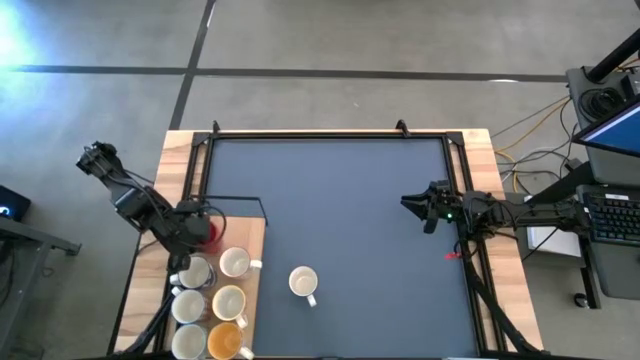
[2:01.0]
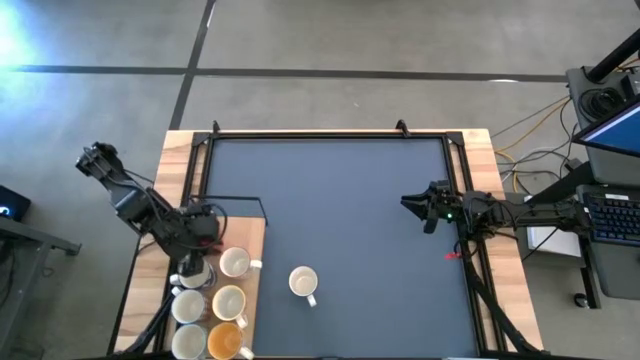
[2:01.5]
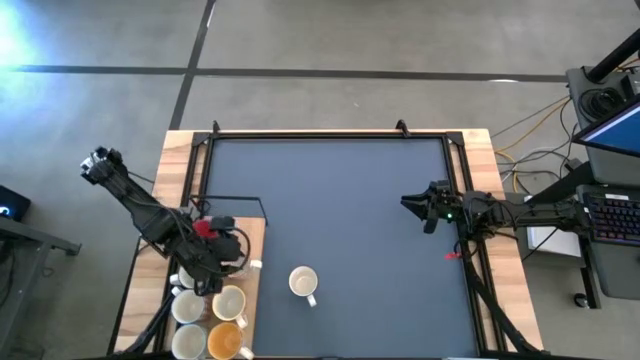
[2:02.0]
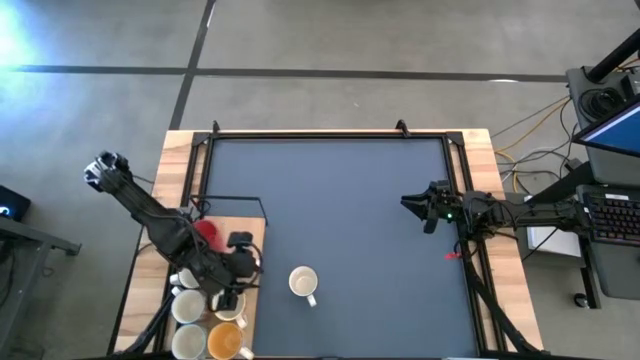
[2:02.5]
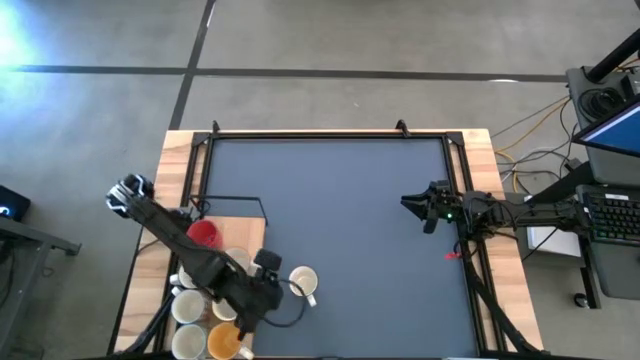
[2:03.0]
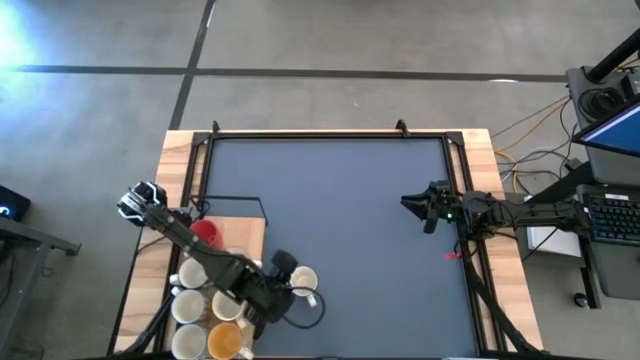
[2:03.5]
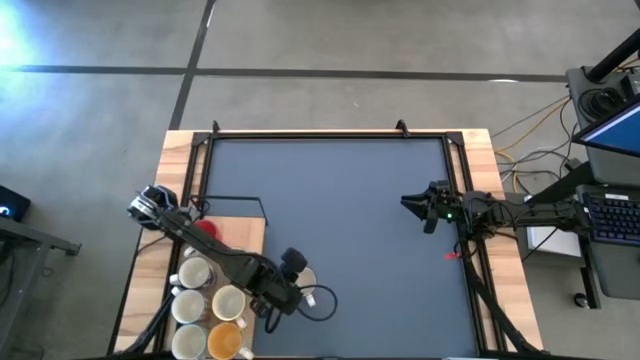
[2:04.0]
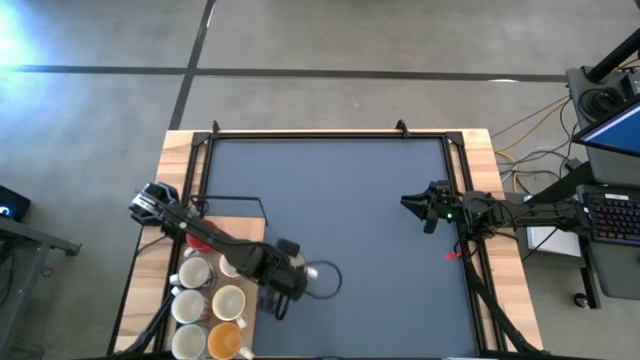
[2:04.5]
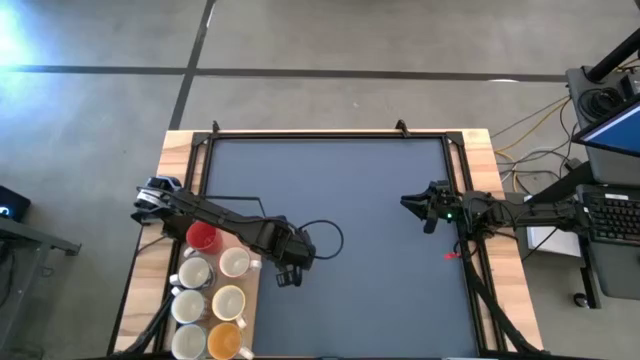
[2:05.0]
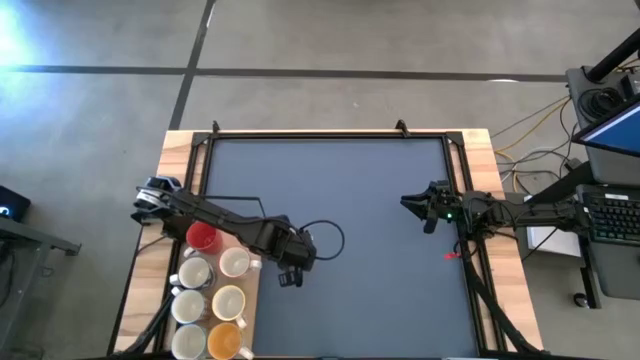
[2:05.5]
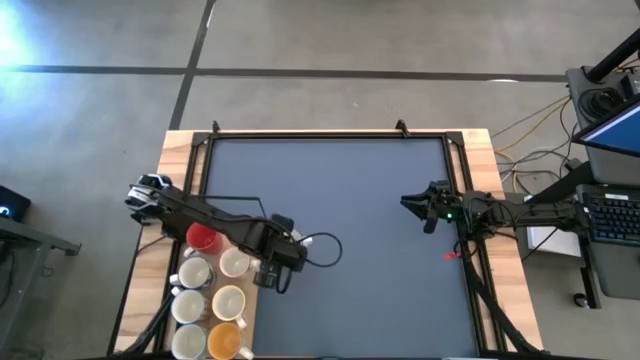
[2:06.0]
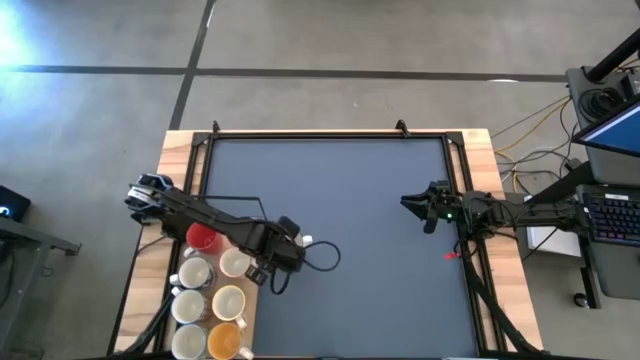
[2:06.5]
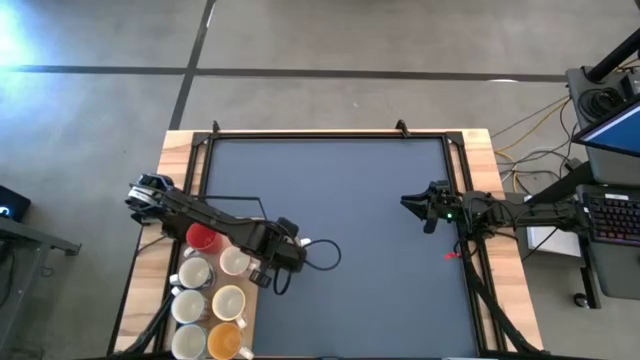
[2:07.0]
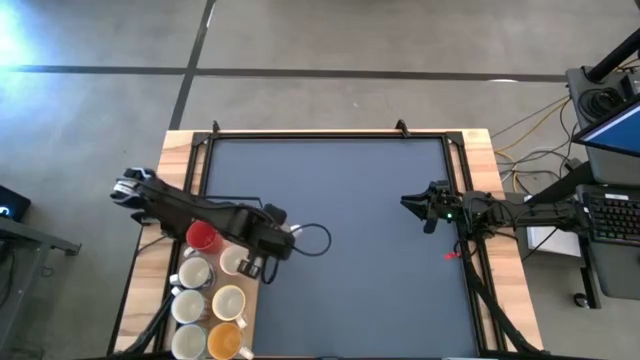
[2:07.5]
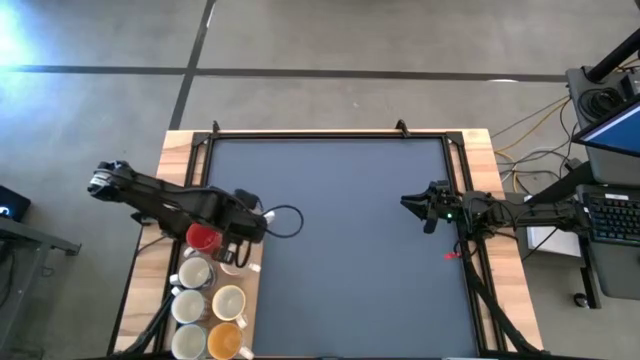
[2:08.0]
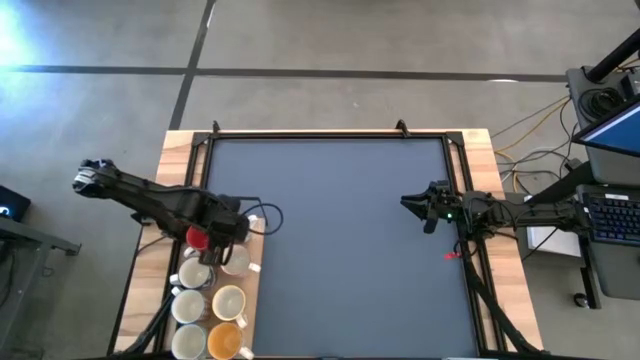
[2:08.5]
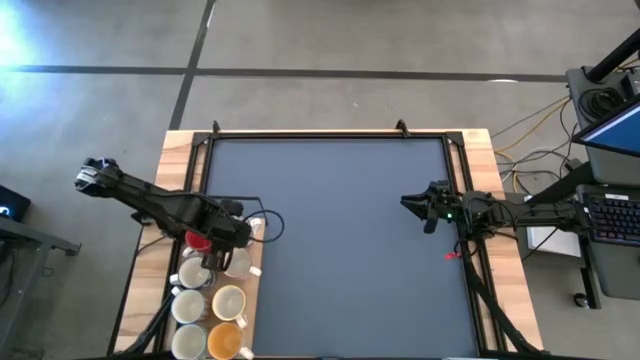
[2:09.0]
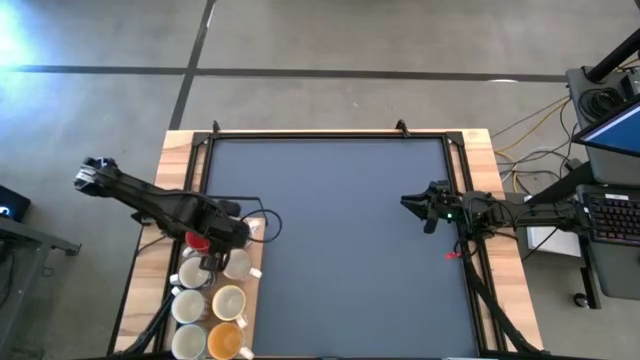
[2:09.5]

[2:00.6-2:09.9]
Task: Place coffee mugs
Put the patterned blue mug on the shelf

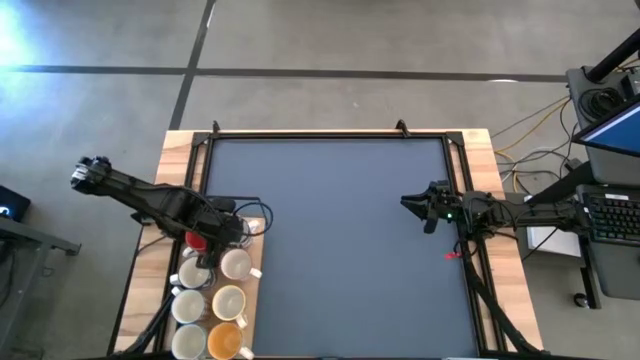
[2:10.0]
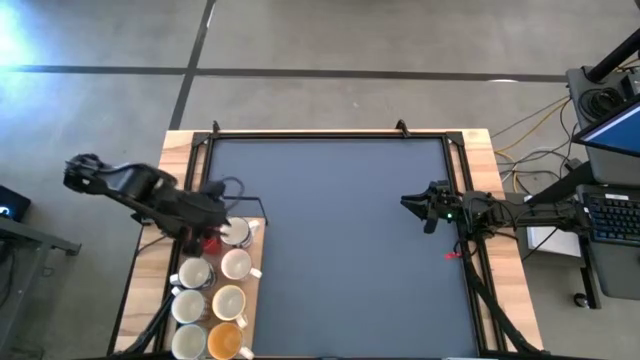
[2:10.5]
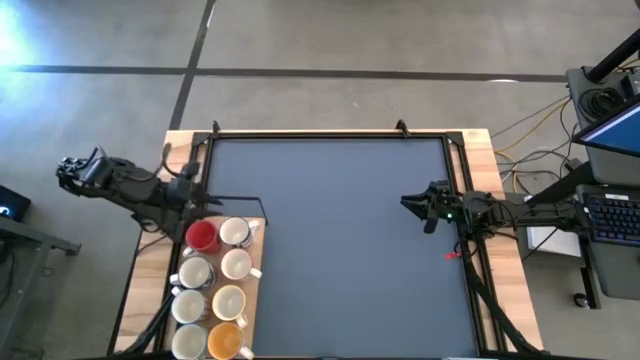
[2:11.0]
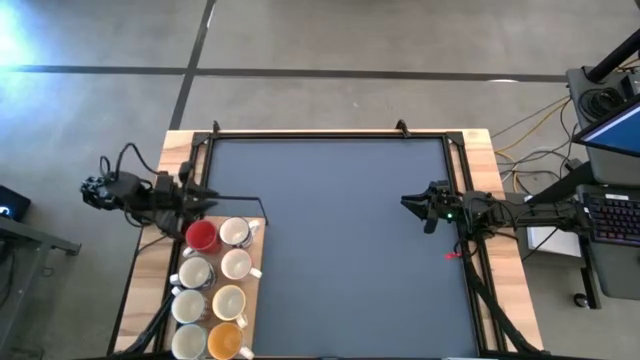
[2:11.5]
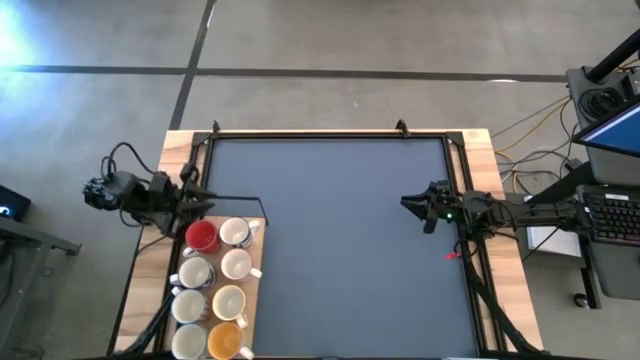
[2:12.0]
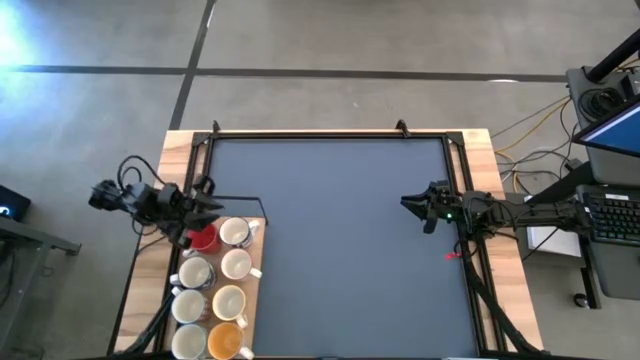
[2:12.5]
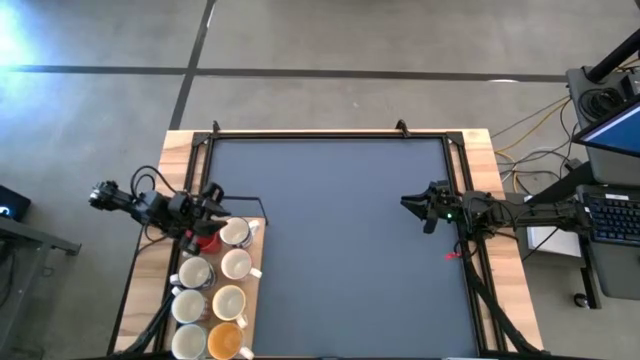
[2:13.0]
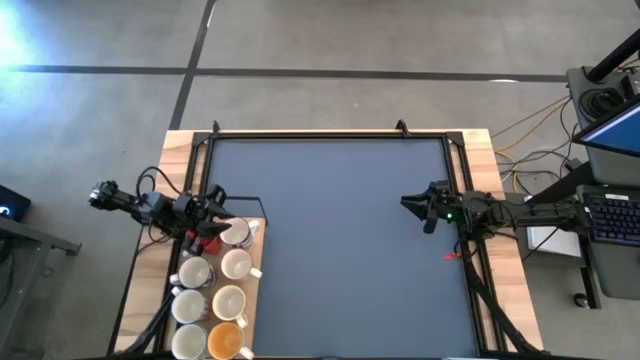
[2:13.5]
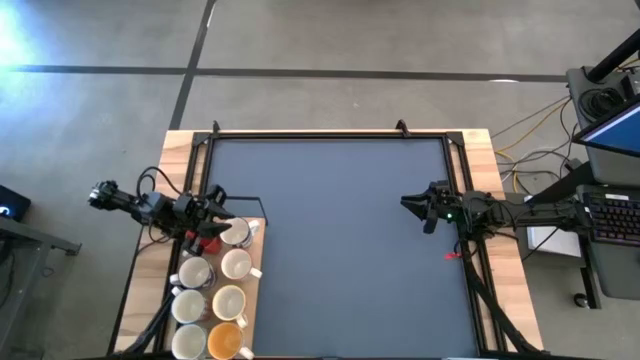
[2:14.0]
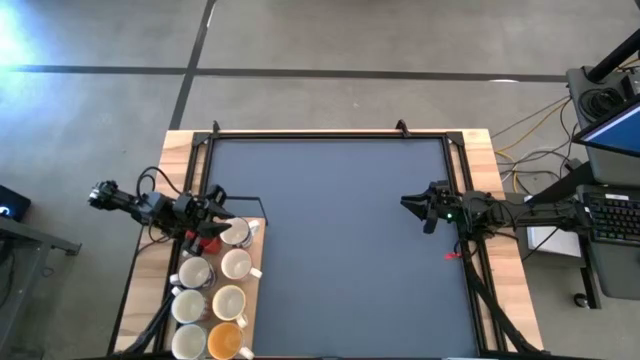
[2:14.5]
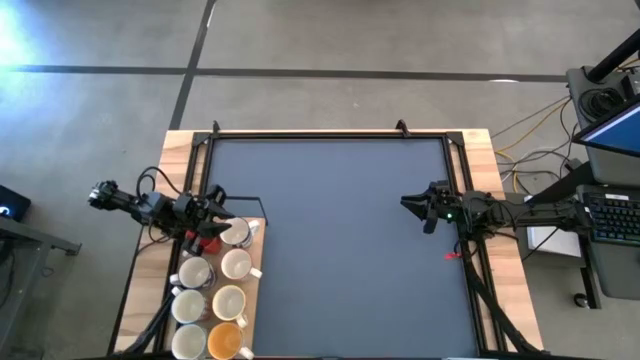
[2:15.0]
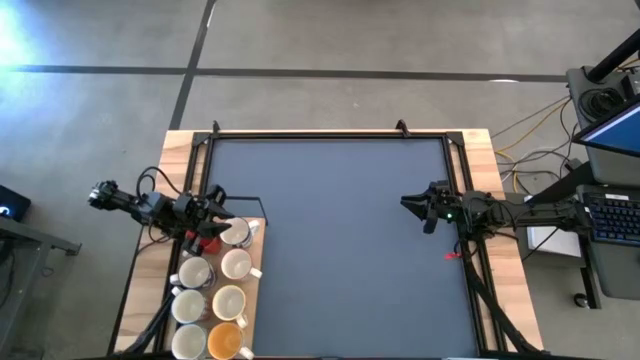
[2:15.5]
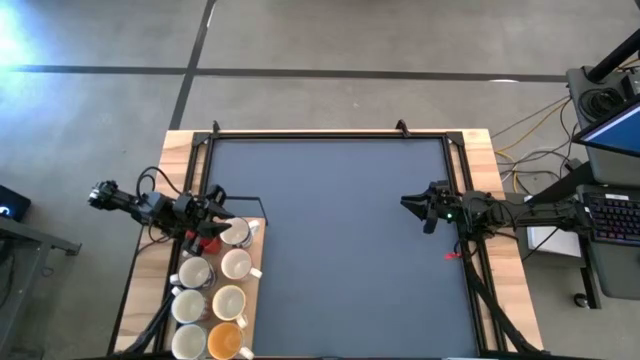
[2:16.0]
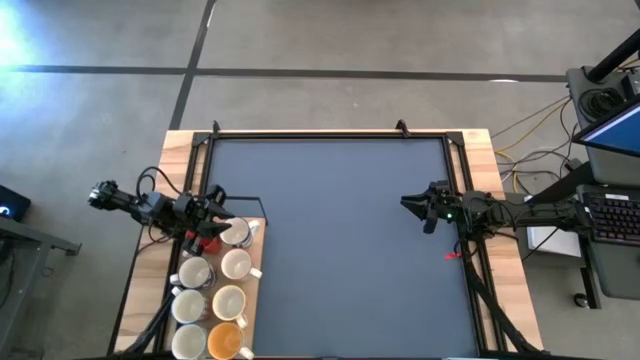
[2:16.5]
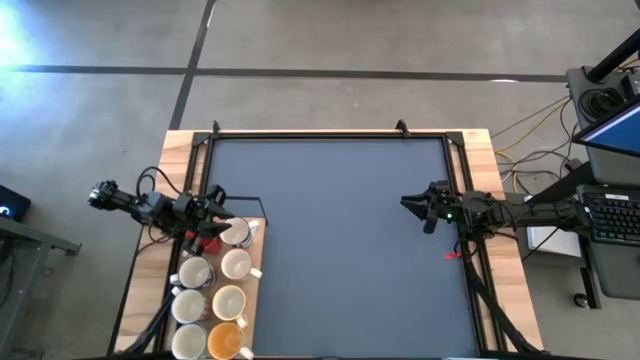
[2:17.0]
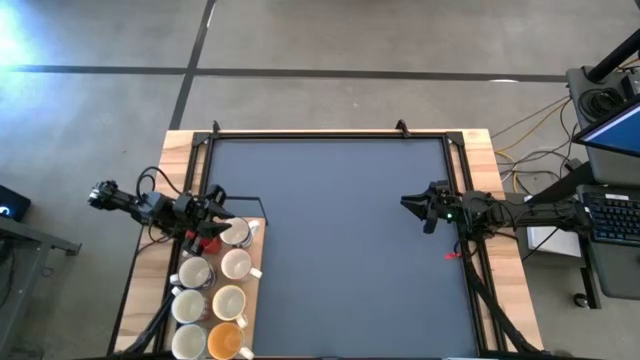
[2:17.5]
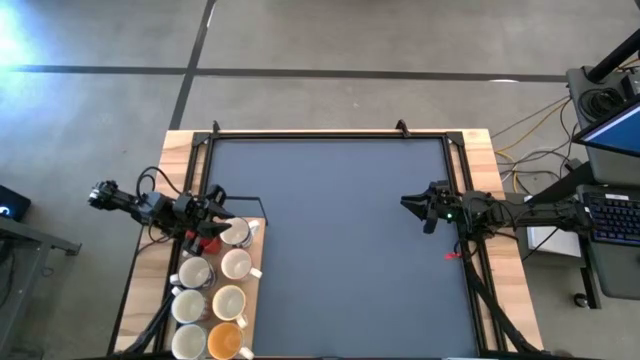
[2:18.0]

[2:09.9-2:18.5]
Return to Home Position

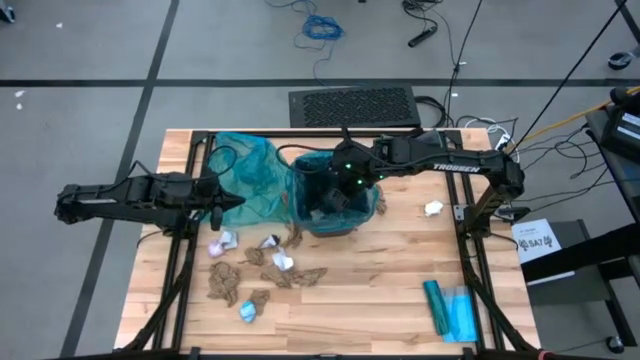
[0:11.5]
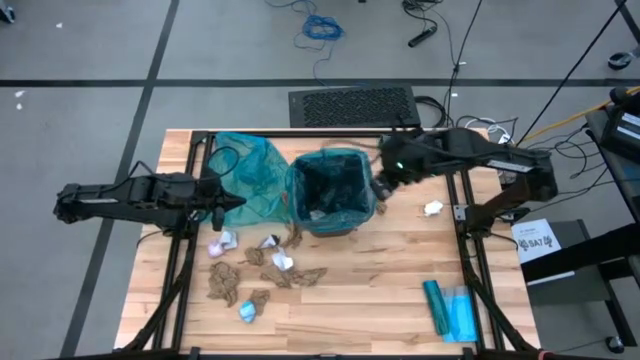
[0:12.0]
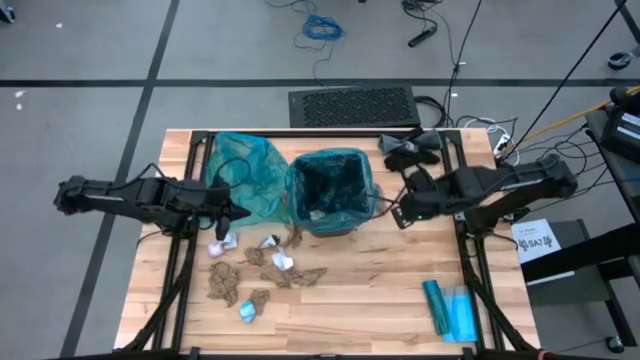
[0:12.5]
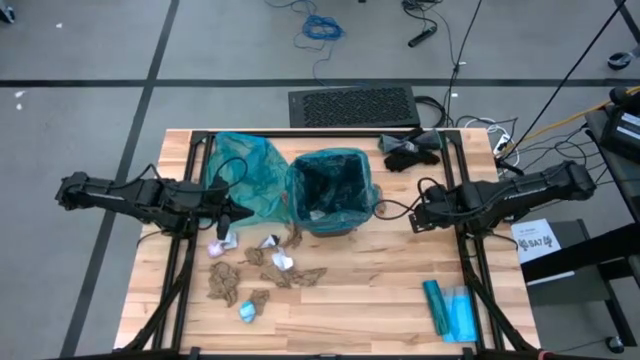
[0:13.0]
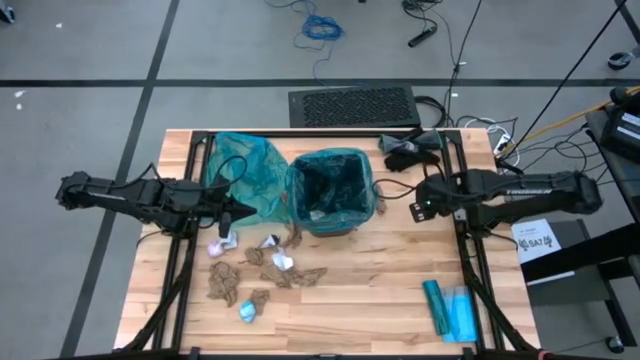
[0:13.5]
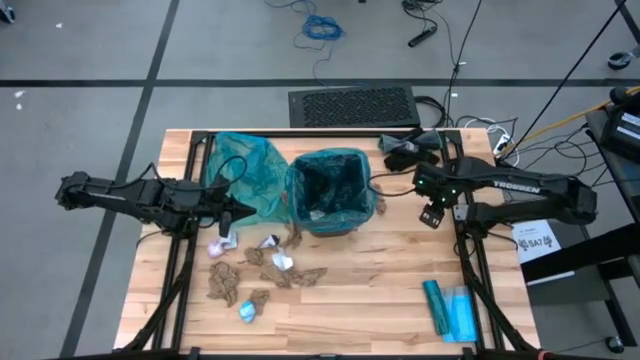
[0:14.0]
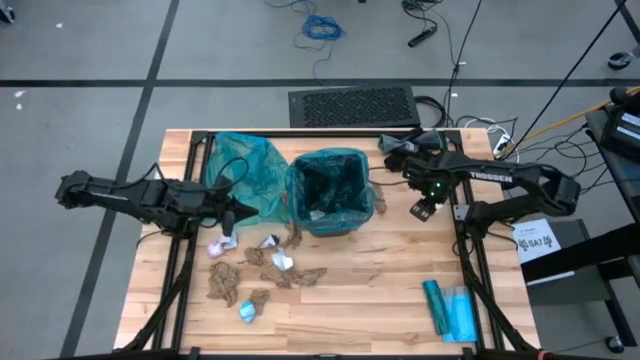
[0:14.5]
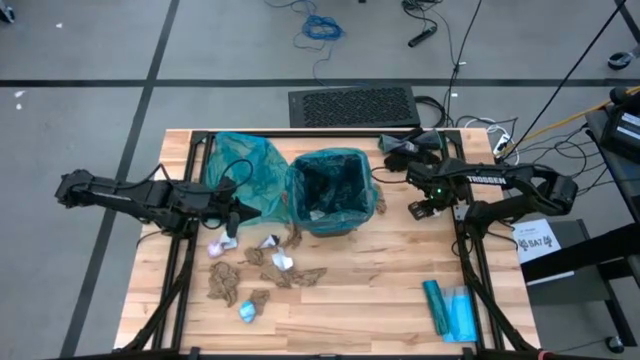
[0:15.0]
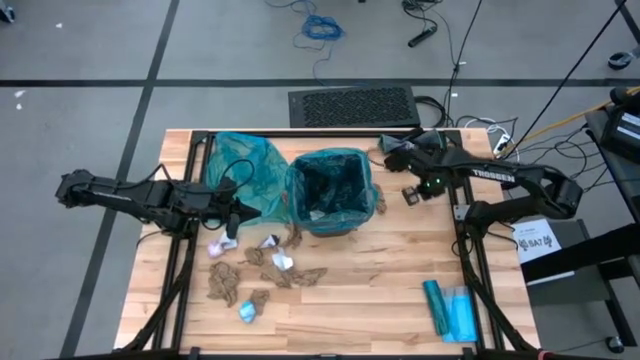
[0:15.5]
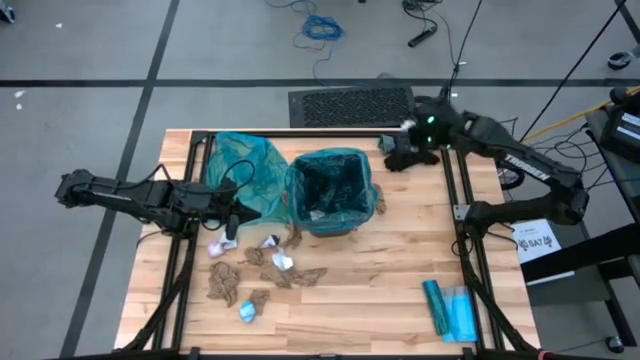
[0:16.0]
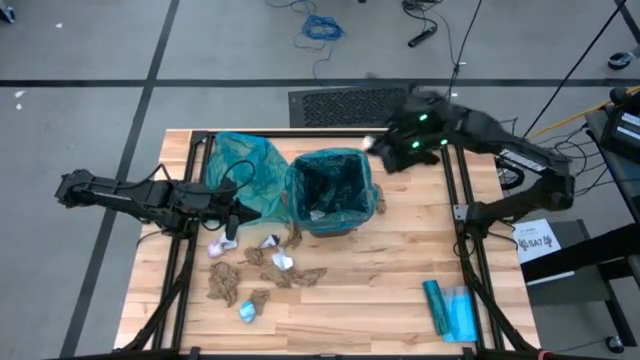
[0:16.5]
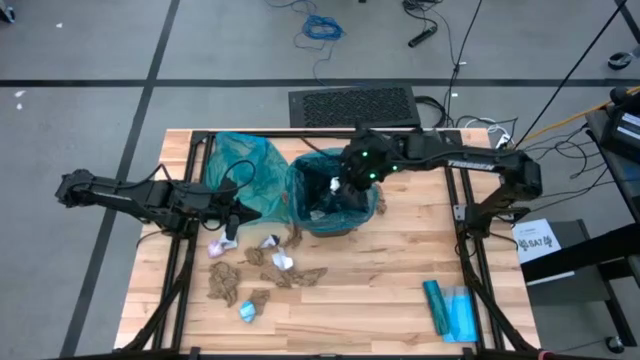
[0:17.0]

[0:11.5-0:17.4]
Task: place trash/remove bag and relplace
Put the white napkin into the trash bin
